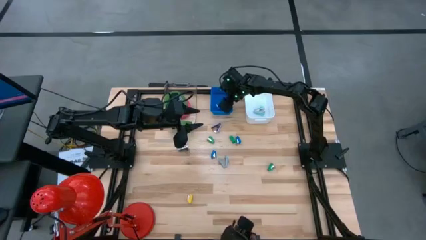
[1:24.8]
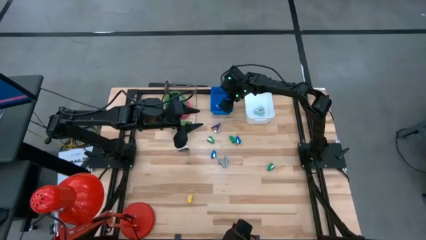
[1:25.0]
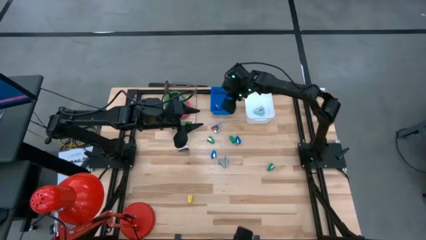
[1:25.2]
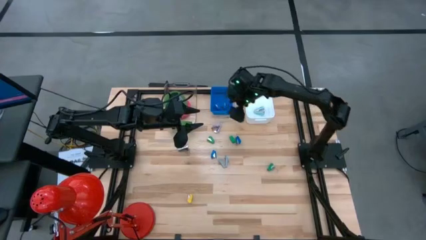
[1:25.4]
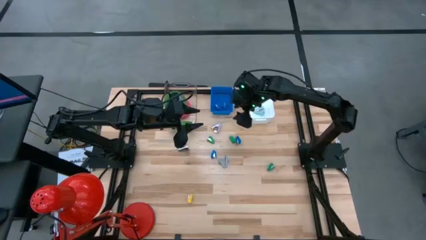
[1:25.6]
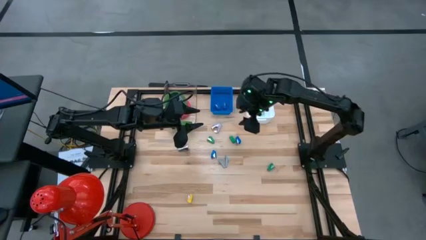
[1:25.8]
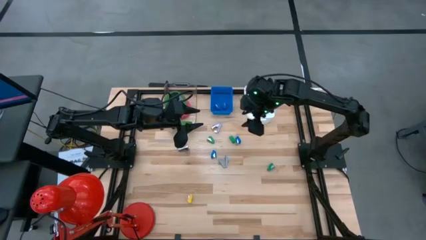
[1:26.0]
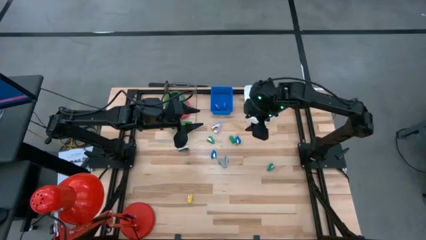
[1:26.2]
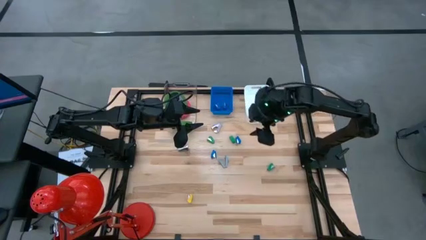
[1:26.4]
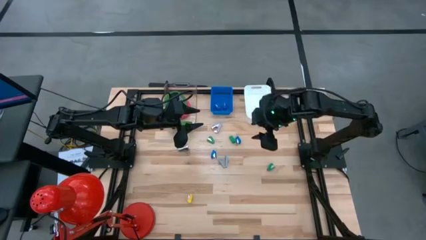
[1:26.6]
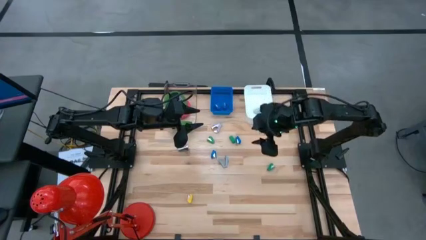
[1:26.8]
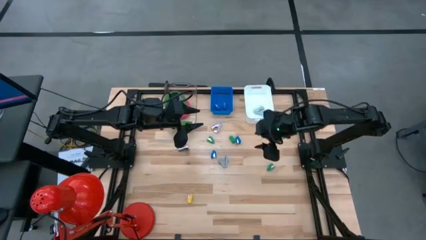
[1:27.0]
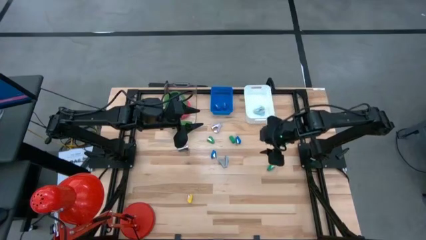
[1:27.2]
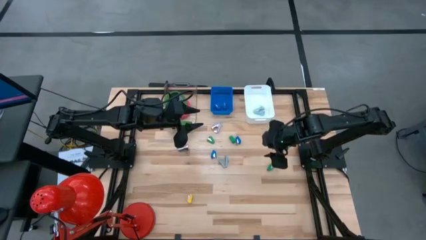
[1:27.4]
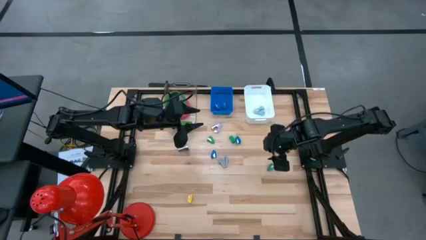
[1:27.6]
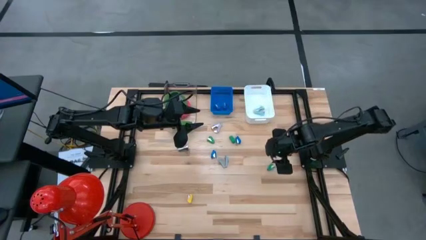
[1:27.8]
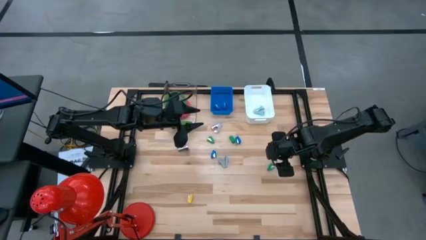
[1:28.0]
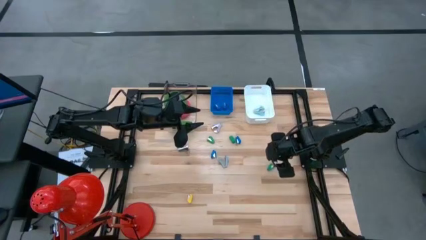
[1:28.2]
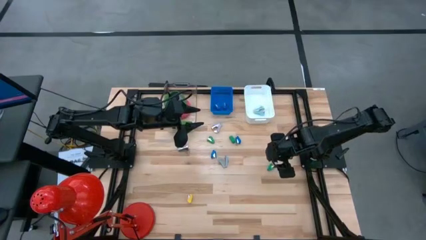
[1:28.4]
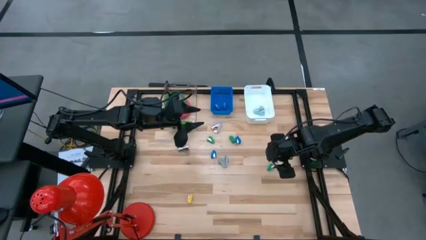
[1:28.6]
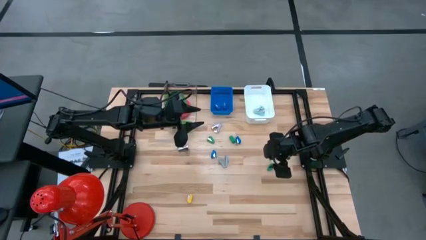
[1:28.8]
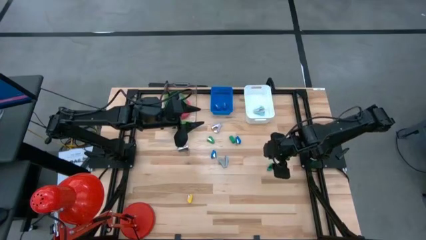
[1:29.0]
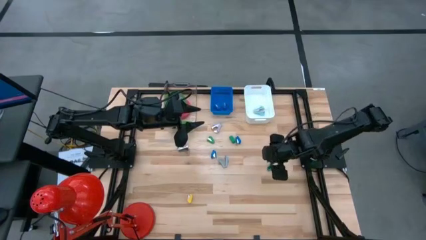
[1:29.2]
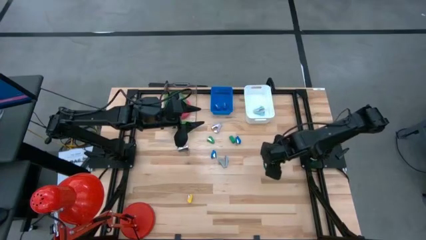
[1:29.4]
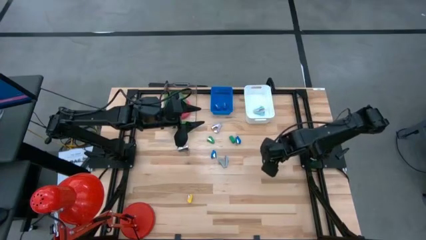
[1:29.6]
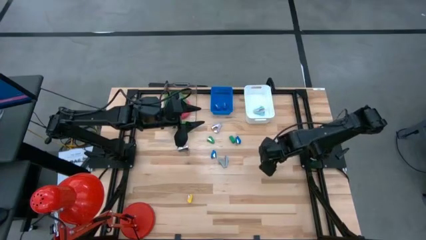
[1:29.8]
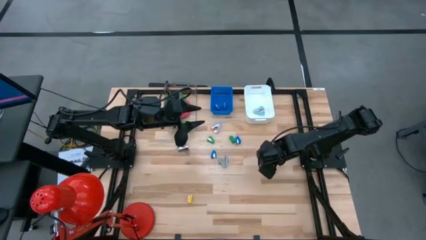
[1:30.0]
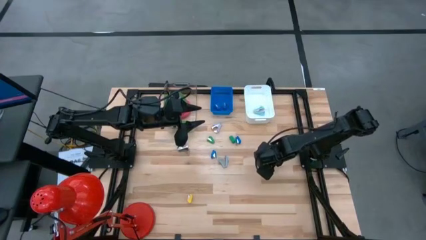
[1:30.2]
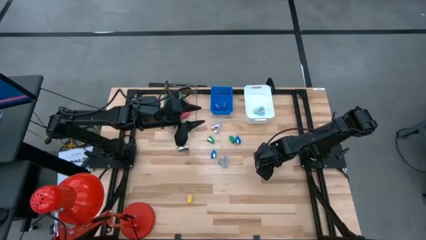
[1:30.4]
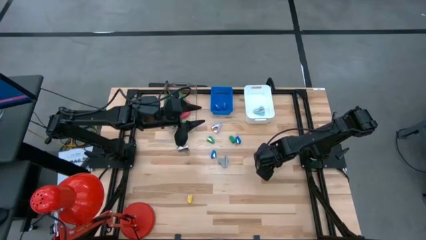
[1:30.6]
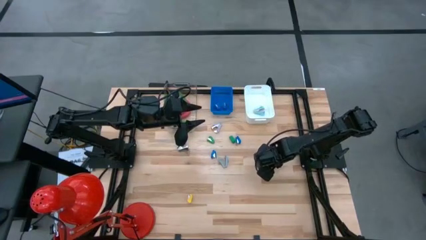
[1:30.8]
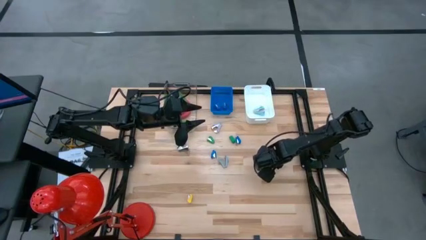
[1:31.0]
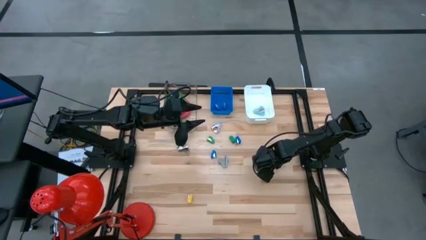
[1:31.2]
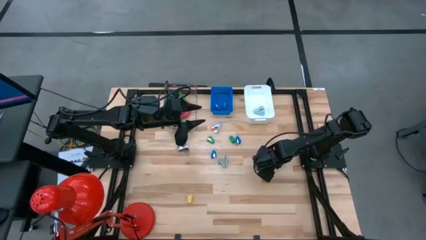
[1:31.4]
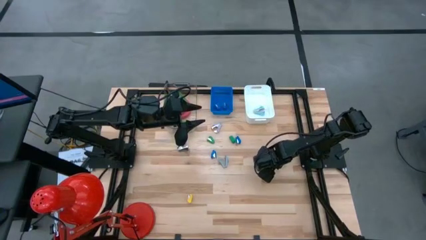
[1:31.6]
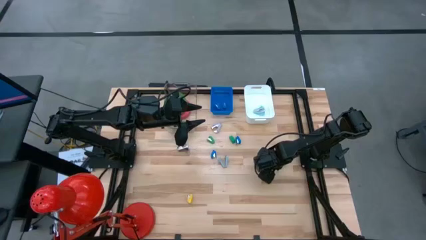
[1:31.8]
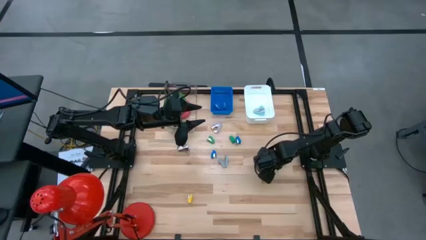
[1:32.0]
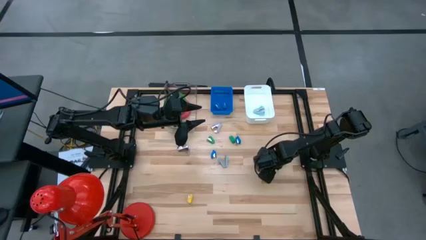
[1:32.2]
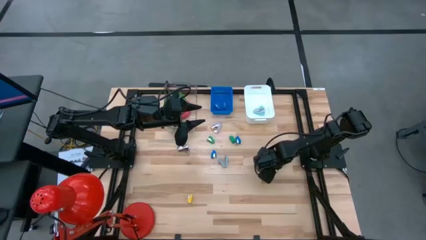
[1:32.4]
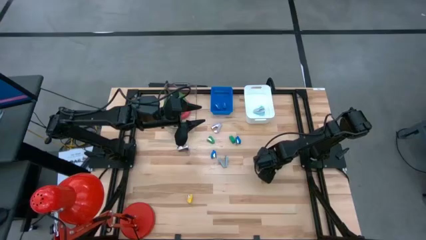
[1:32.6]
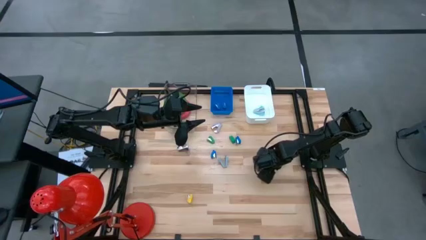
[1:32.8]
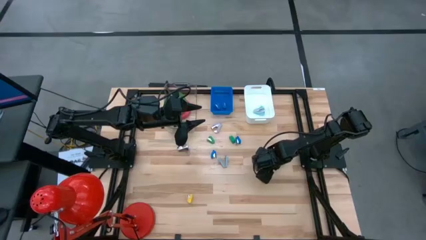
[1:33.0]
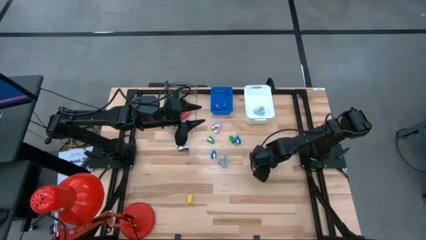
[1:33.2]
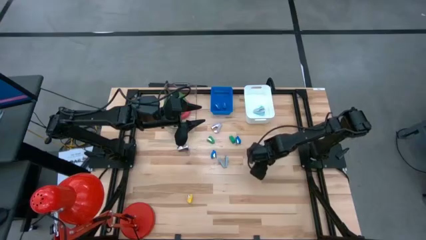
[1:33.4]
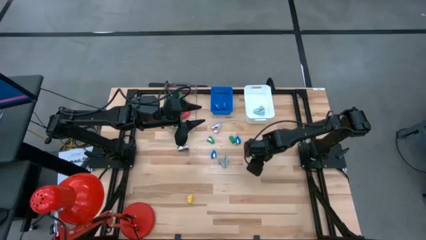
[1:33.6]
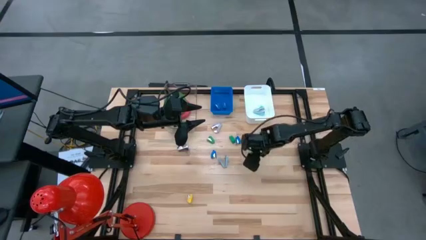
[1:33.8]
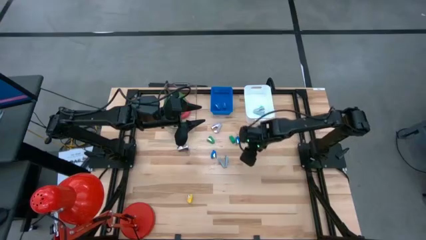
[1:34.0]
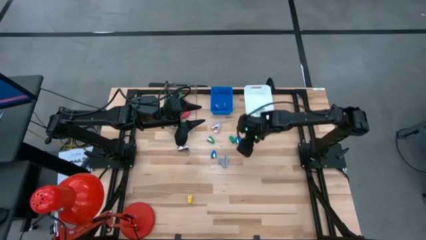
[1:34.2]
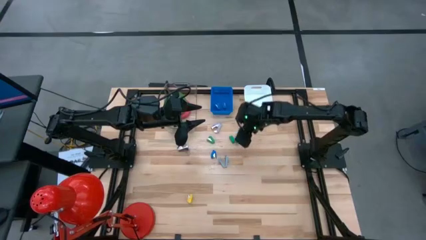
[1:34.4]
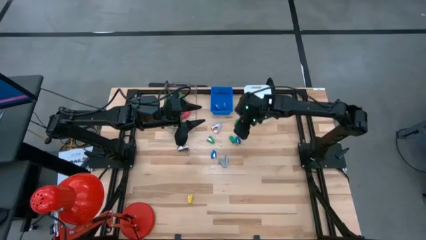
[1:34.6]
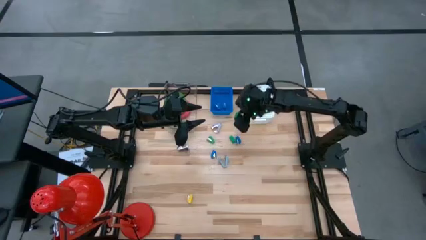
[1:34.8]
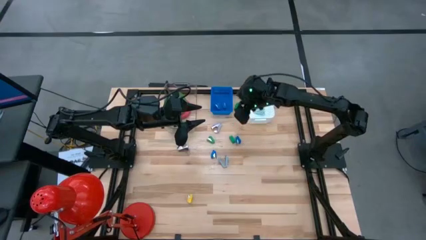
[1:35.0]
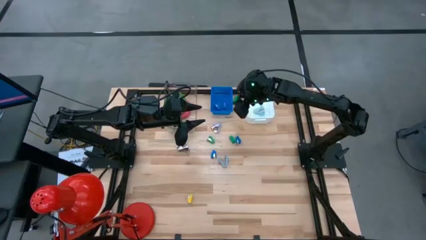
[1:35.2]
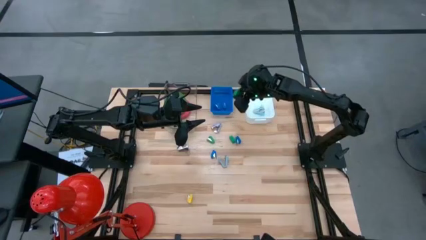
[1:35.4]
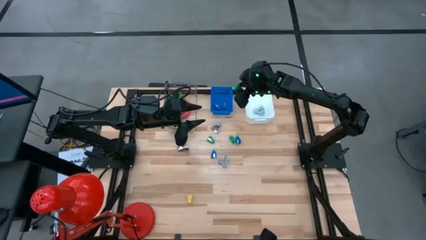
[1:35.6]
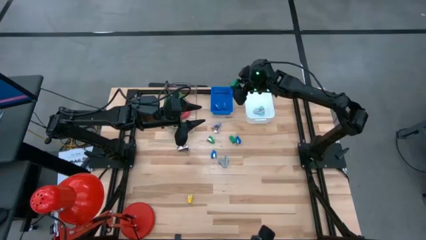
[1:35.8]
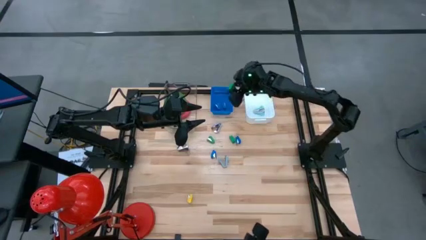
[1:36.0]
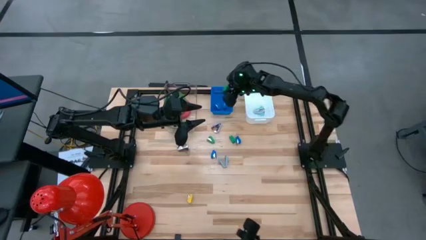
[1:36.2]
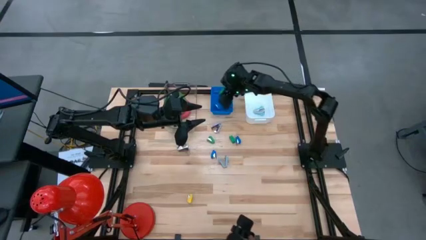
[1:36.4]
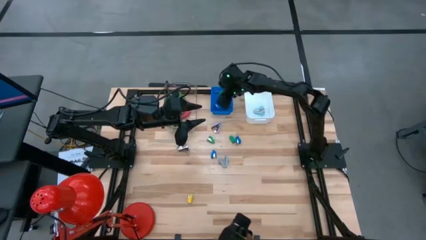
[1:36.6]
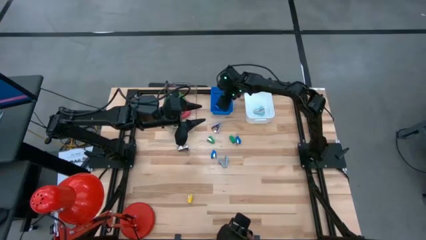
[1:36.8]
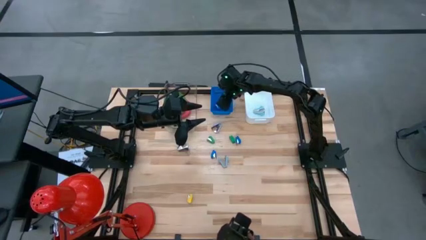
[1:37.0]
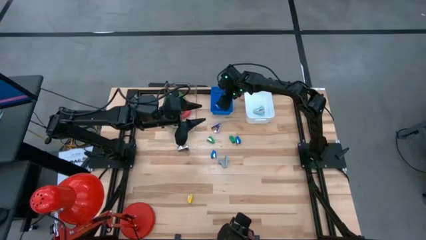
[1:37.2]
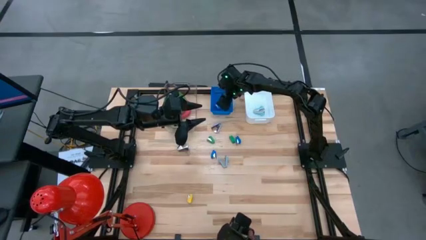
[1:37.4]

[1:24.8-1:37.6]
Task: Pick and place Stapler, Stapler remover, tape
Put the bottom green stapler into the blue bin
